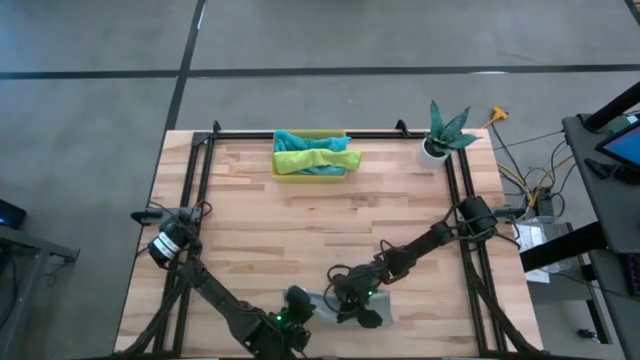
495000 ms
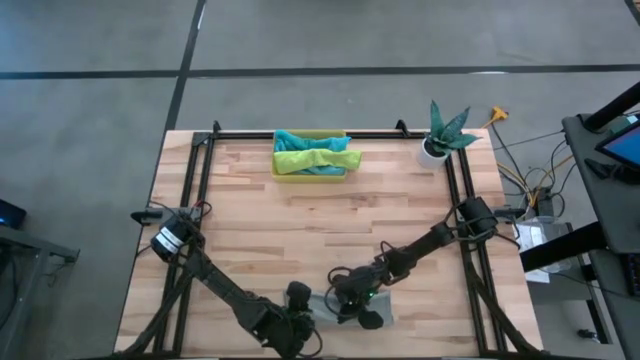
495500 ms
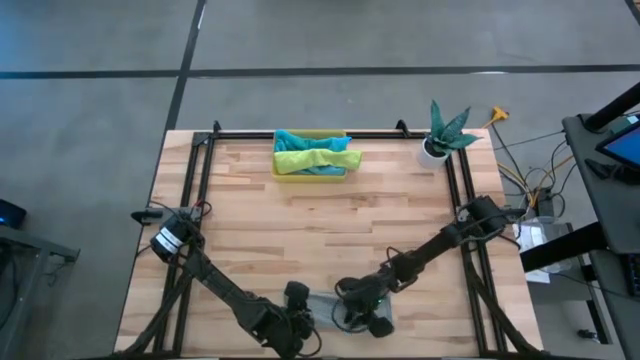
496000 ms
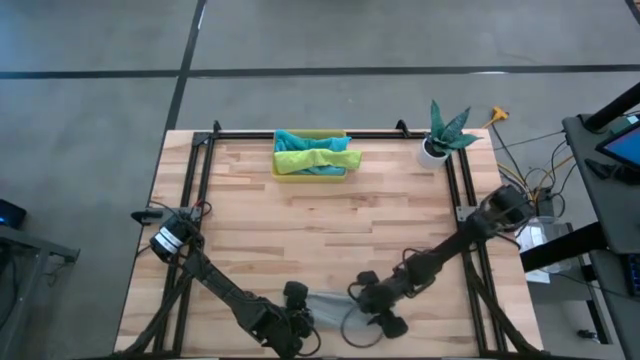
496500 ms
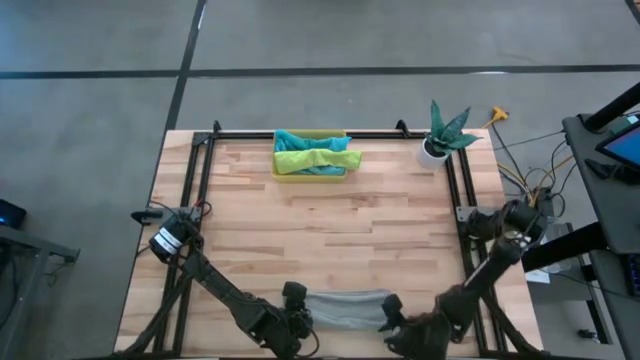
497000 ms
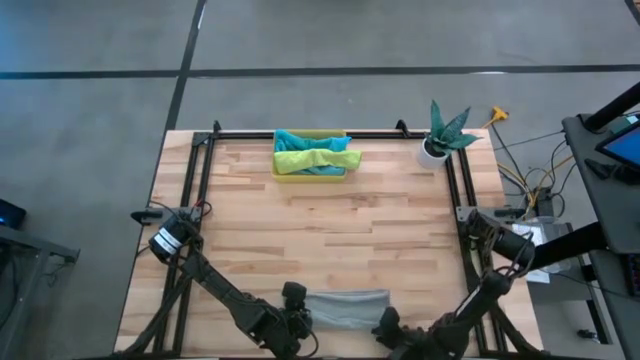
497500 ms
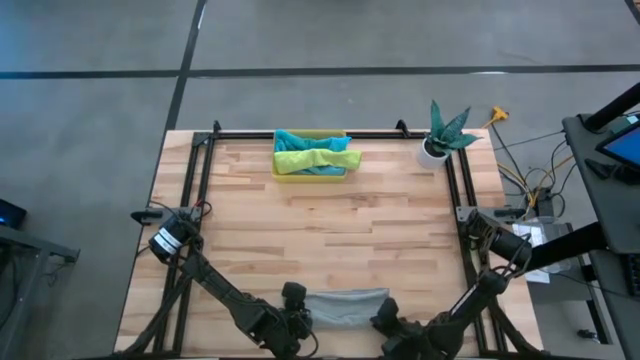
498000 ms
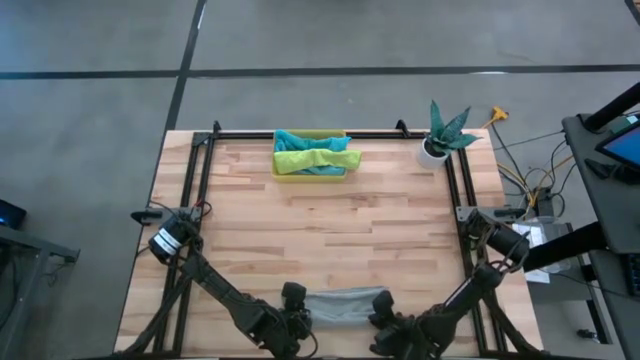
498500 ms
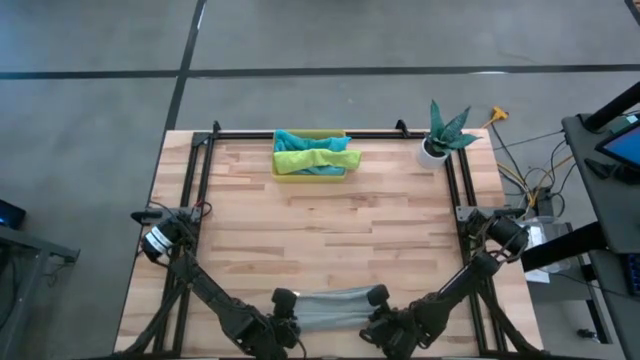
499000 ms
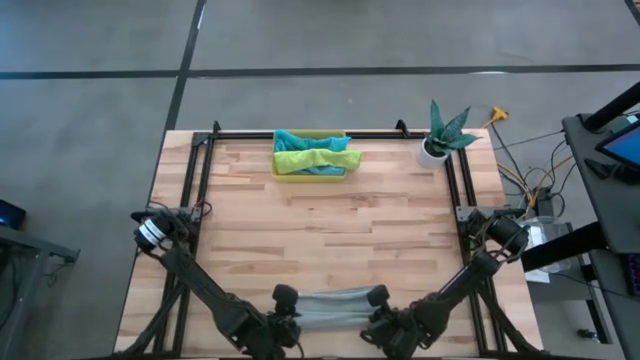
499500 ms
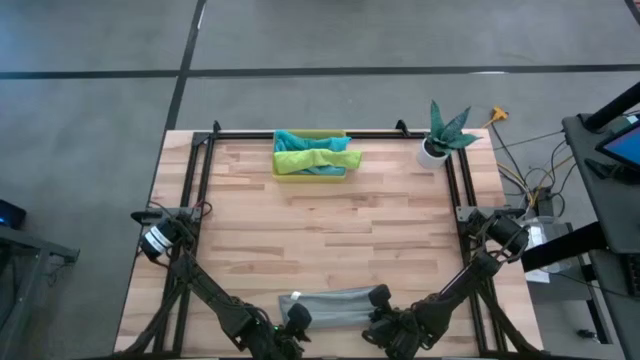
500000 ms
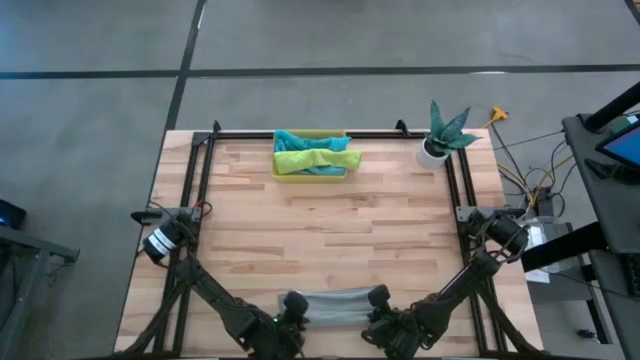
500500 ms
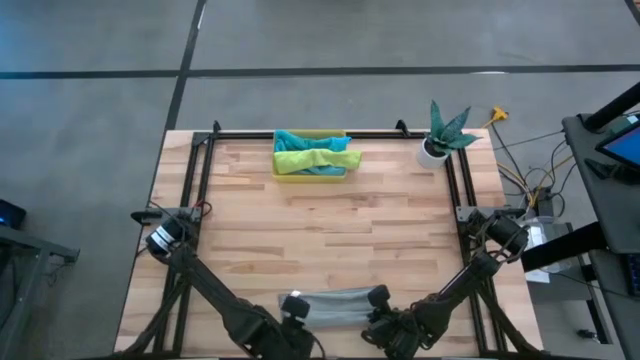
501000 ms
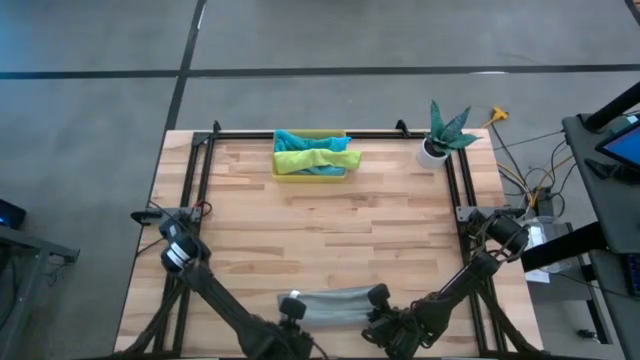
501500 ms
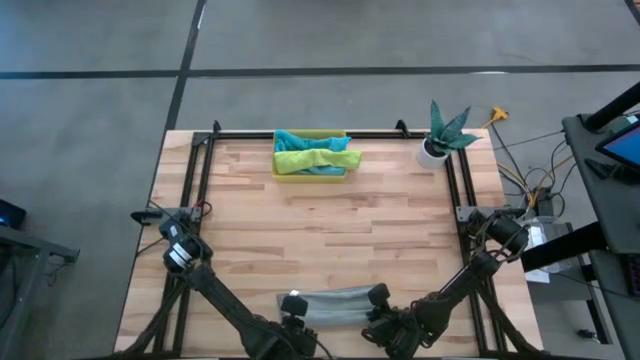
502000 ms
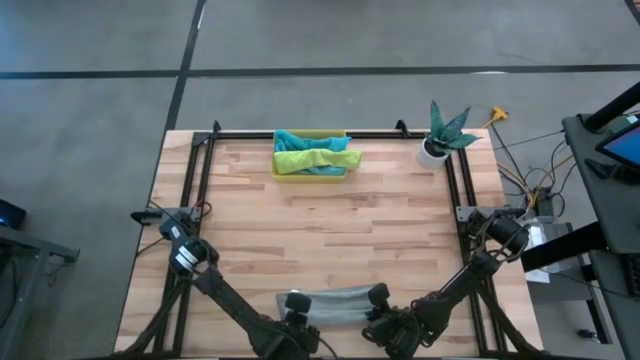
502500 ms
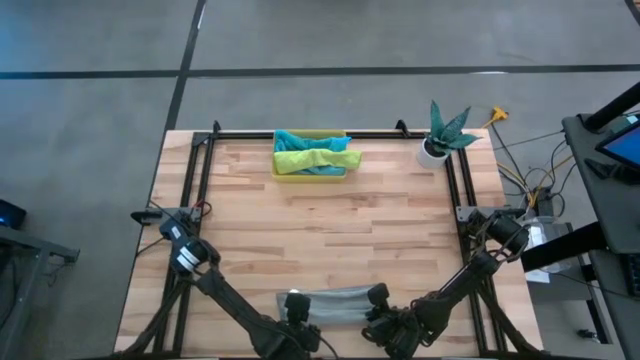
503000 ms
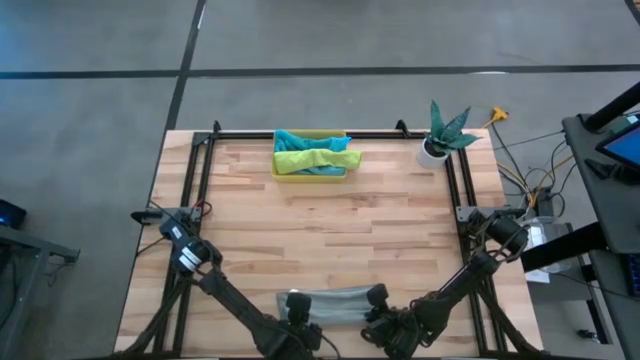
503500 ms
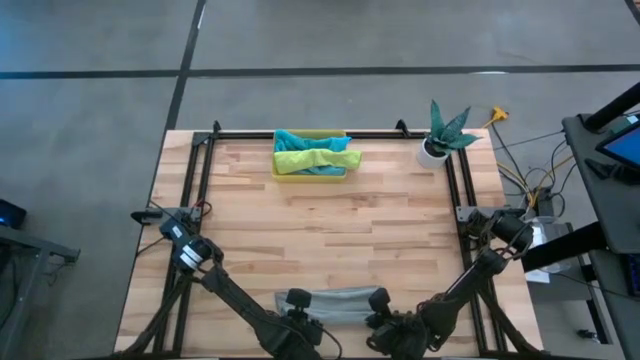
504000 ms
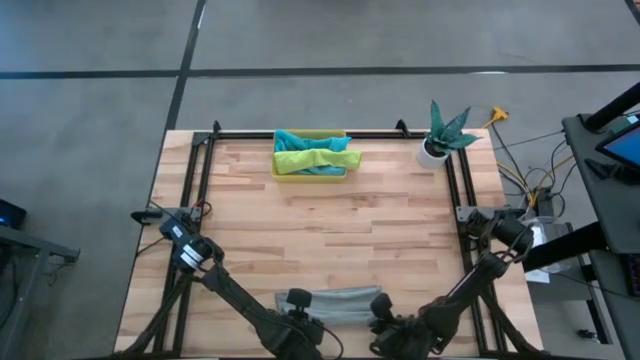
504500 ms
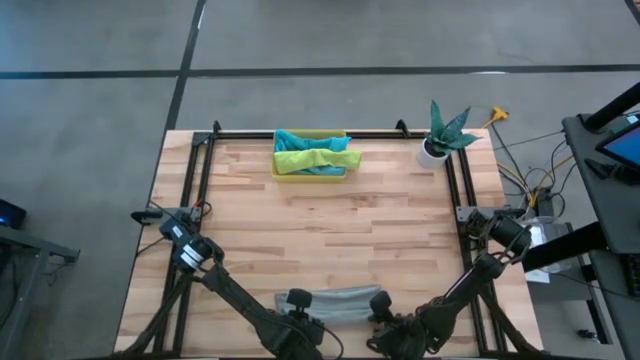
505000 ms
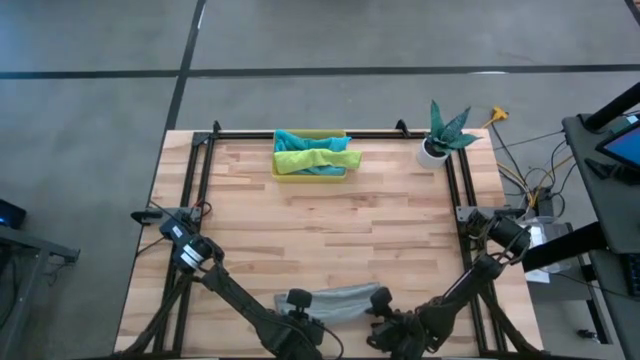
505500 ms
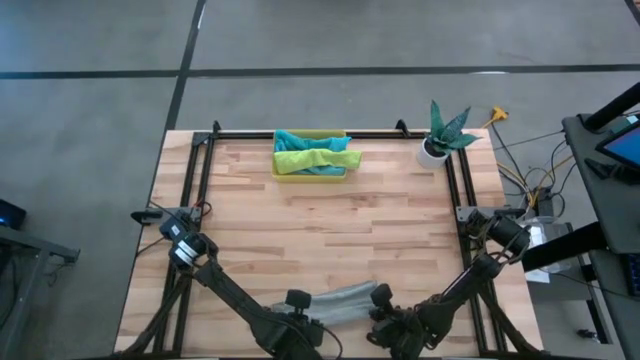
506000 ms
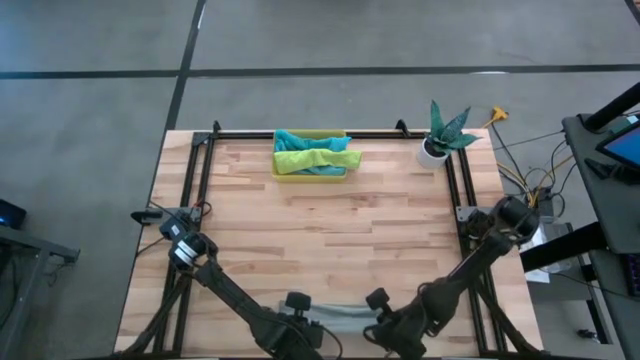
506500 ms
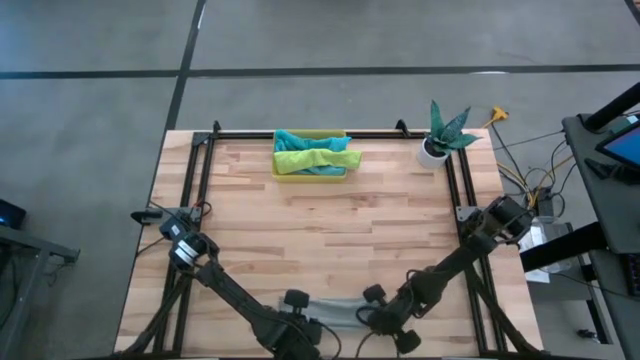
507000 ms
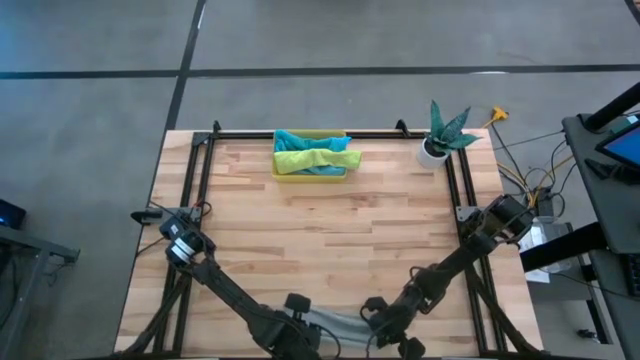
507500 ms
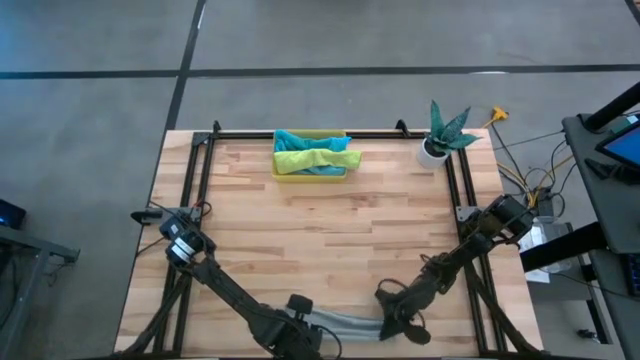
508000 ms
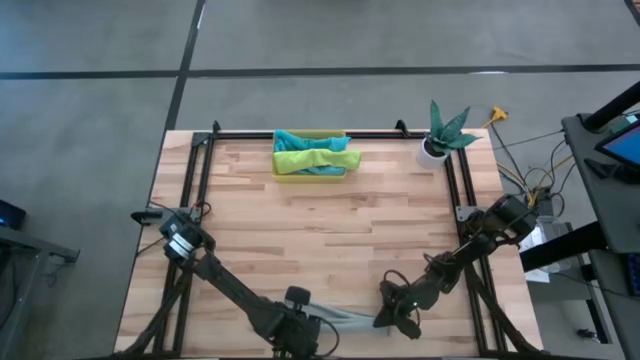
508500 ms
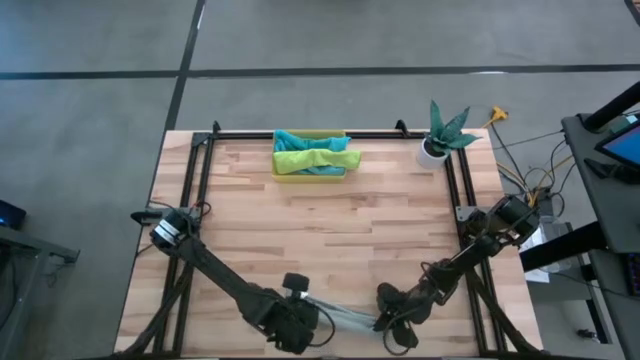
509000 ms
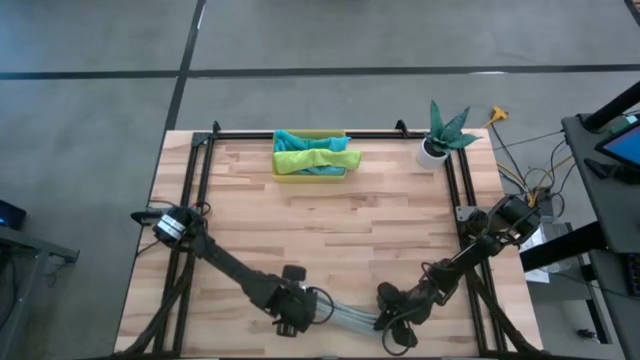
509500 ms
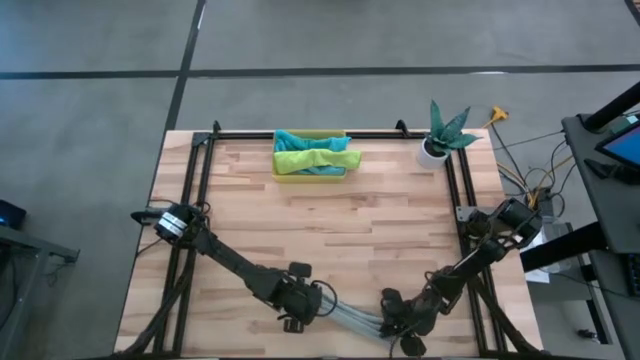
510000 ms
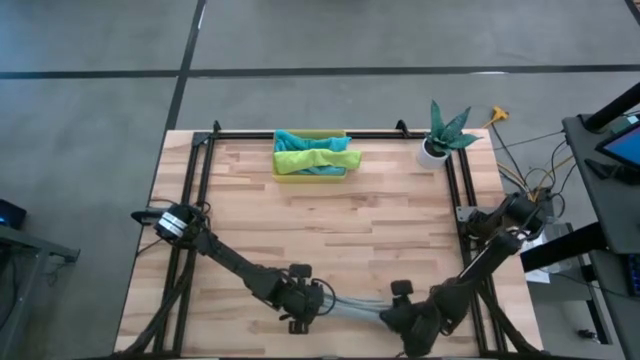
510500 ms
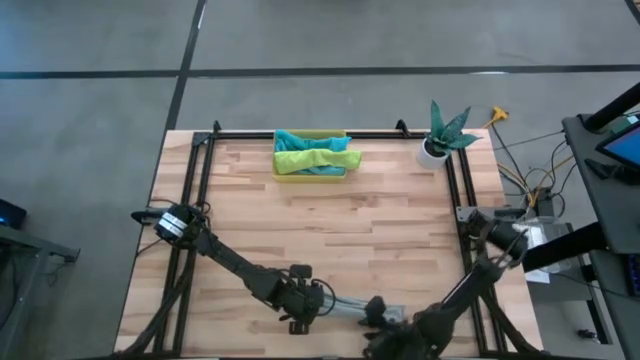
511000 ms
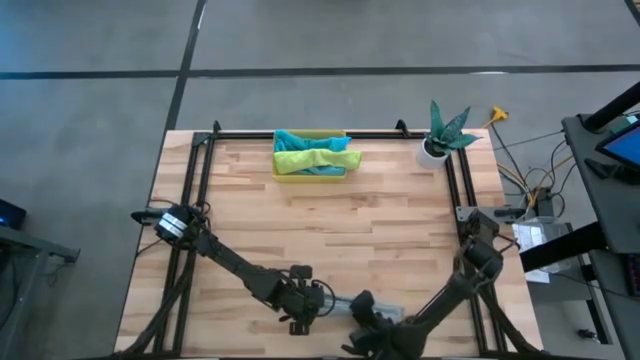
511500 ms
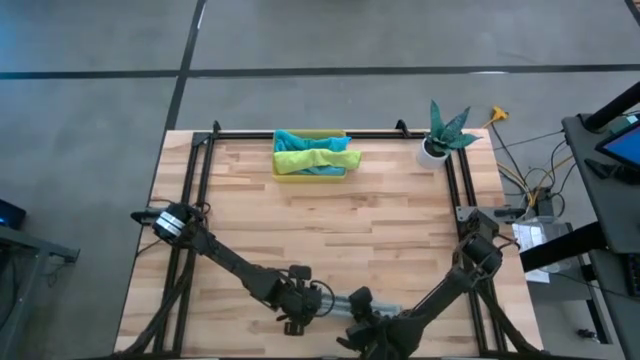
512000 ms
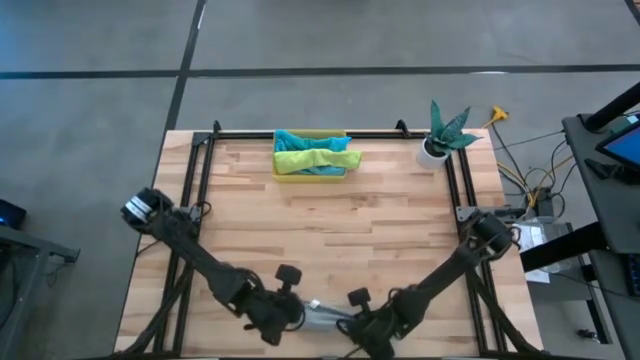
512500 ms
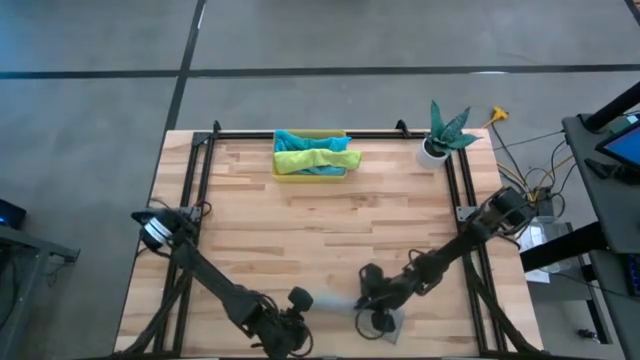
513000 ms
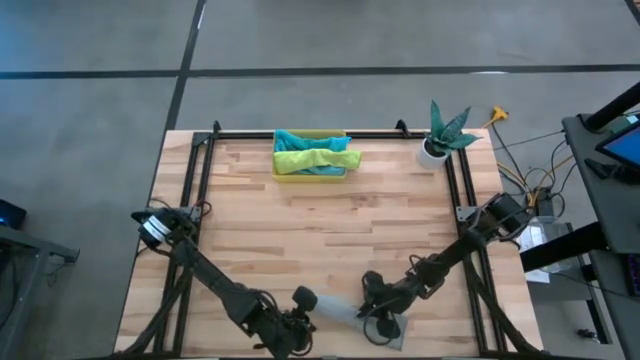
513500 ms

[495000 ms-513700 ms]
Task: Roll microfiber towels into tight, uniform cylinder then place into a basket
Roll the gray towel
